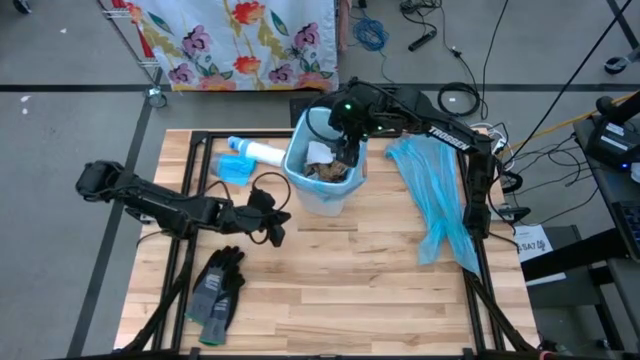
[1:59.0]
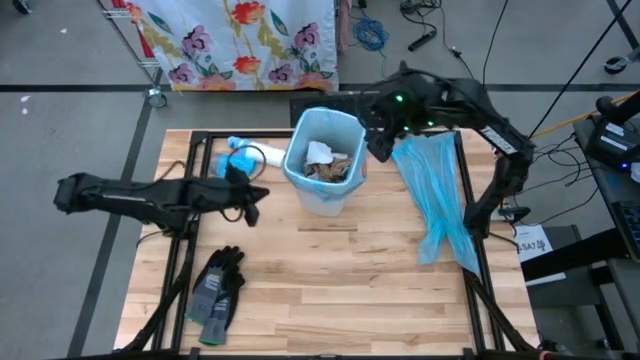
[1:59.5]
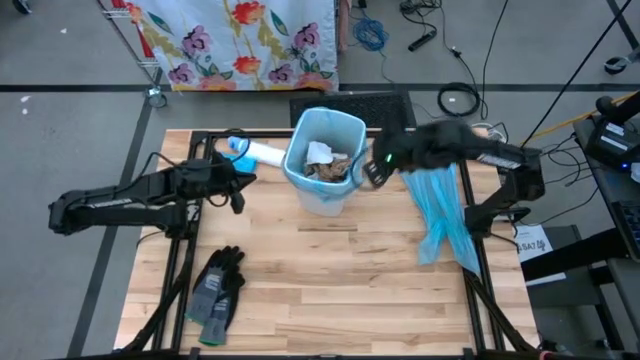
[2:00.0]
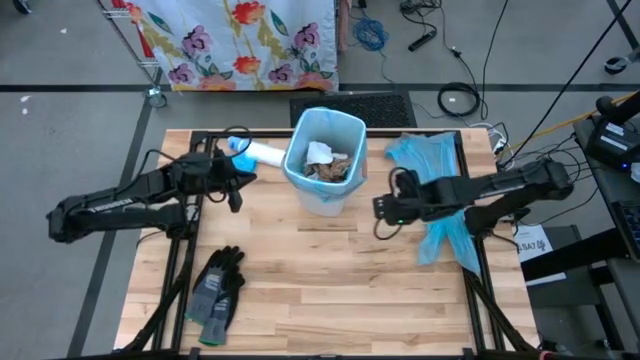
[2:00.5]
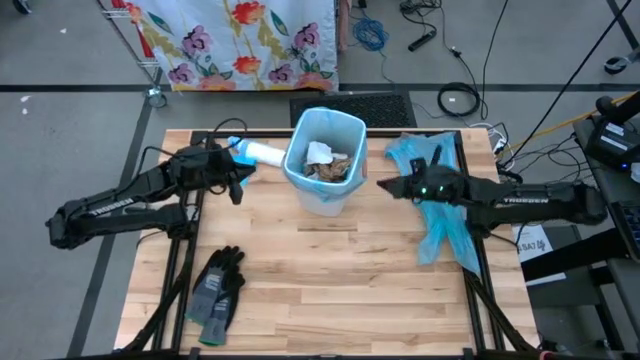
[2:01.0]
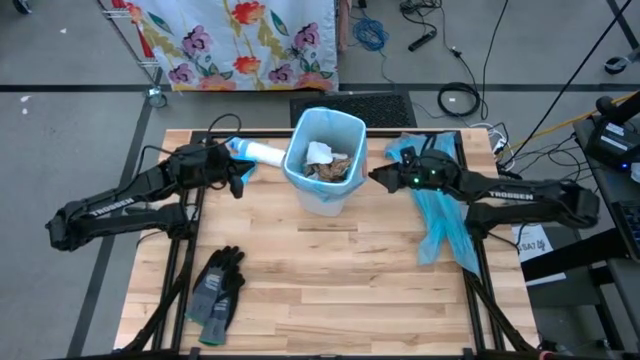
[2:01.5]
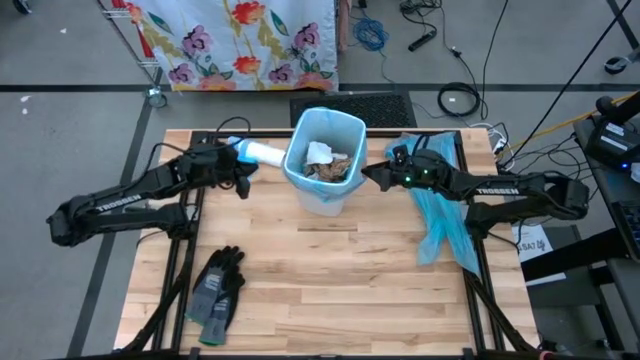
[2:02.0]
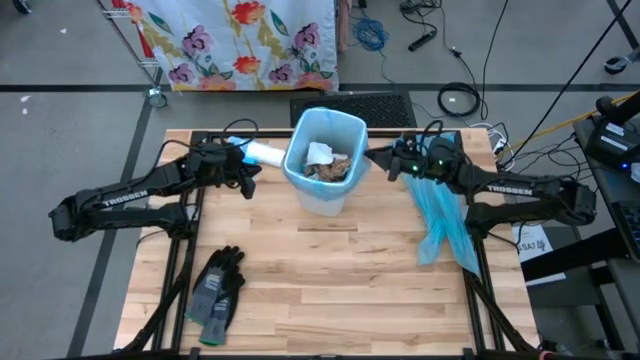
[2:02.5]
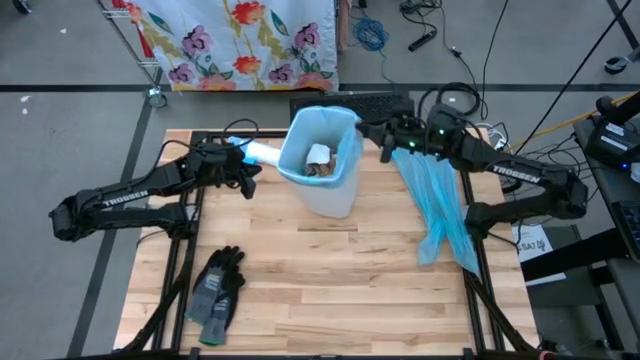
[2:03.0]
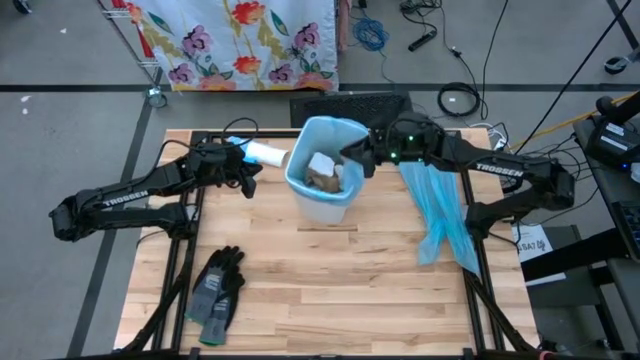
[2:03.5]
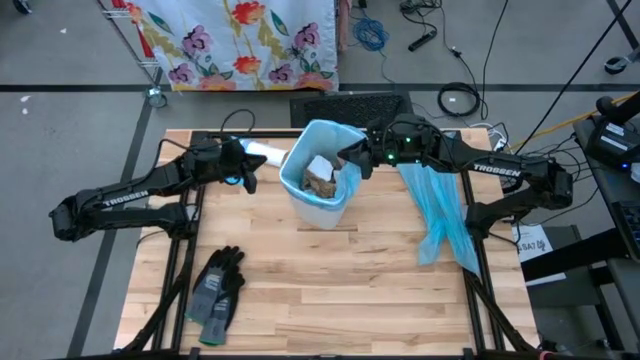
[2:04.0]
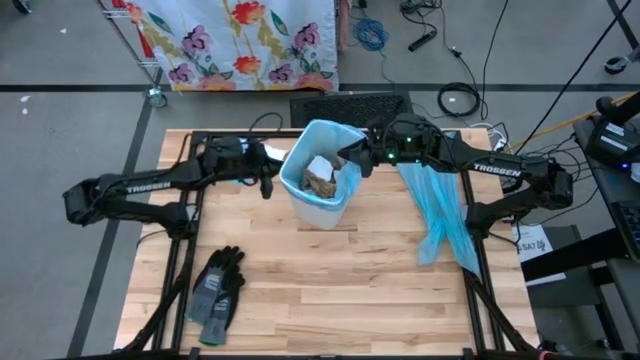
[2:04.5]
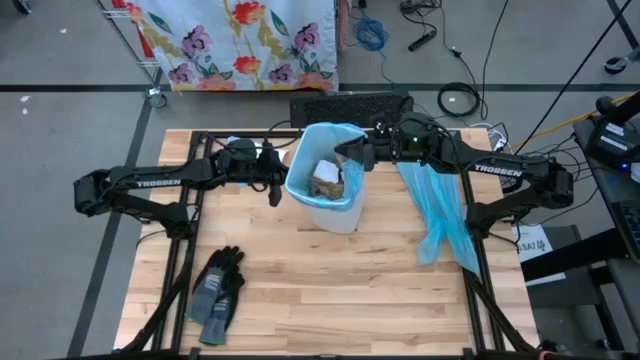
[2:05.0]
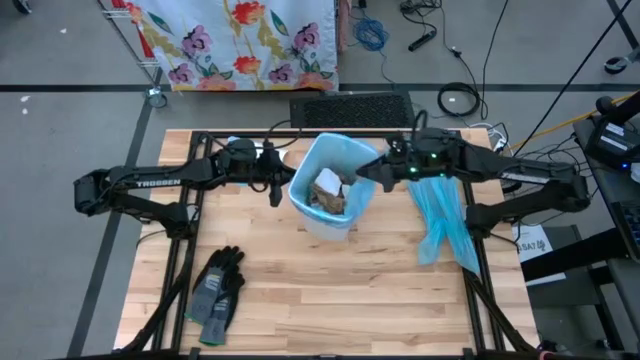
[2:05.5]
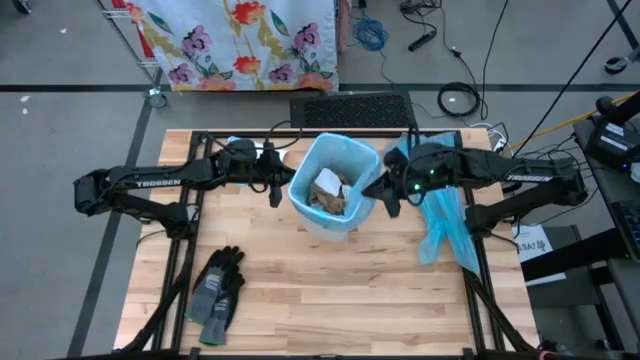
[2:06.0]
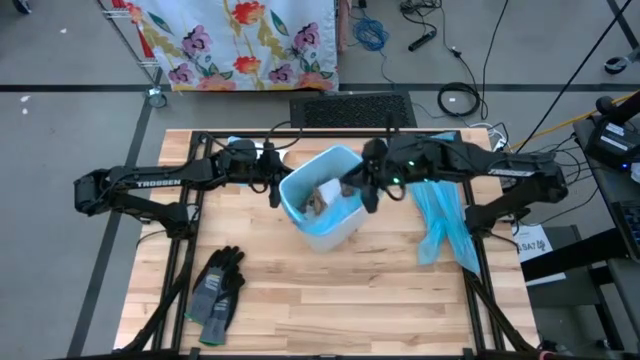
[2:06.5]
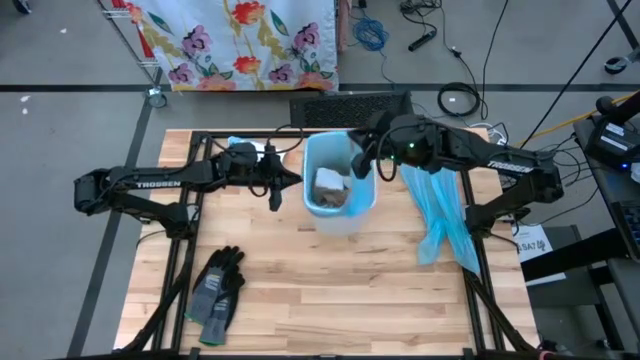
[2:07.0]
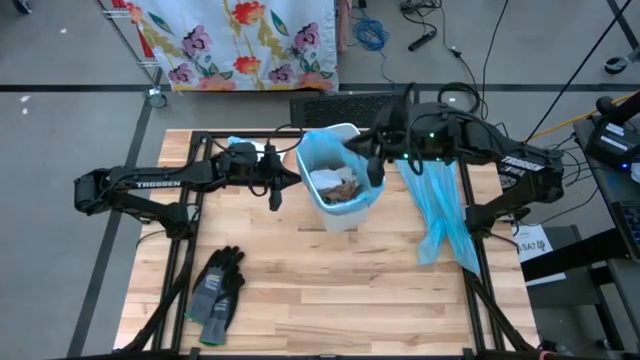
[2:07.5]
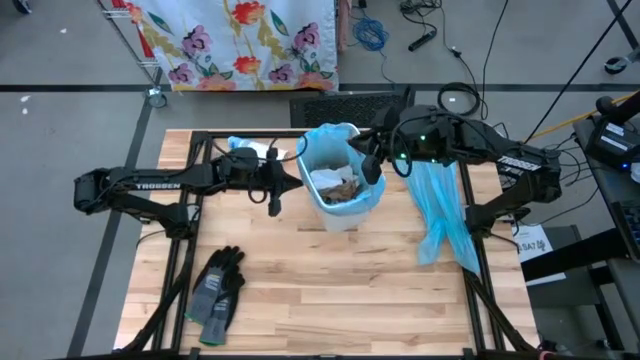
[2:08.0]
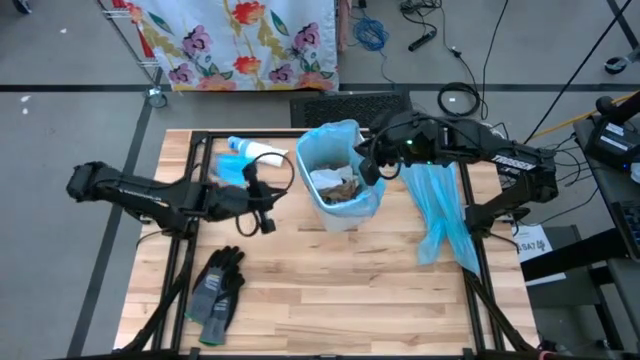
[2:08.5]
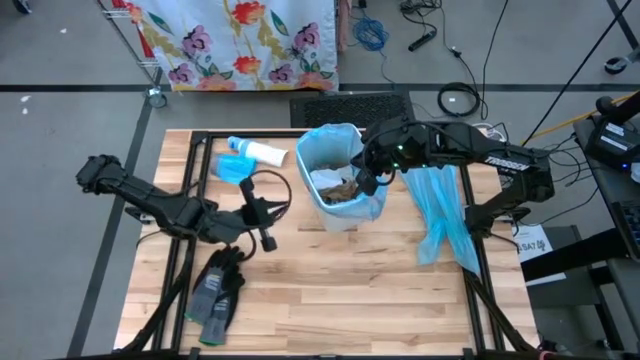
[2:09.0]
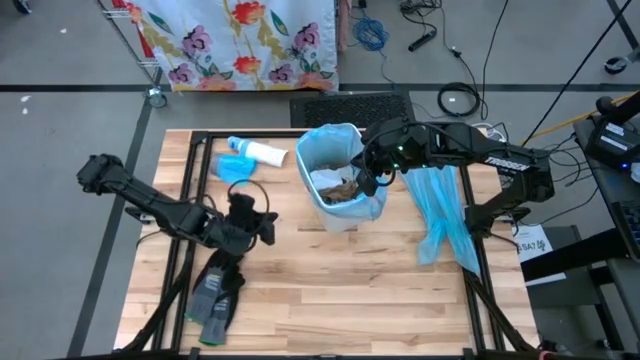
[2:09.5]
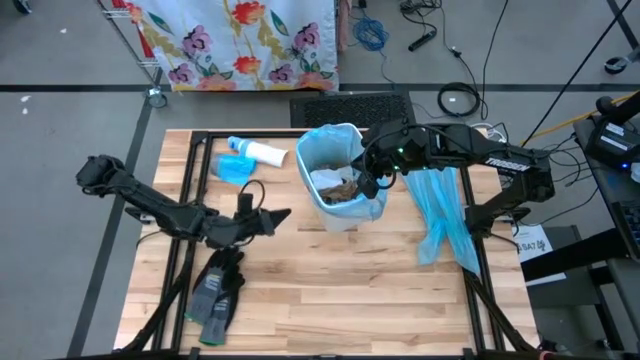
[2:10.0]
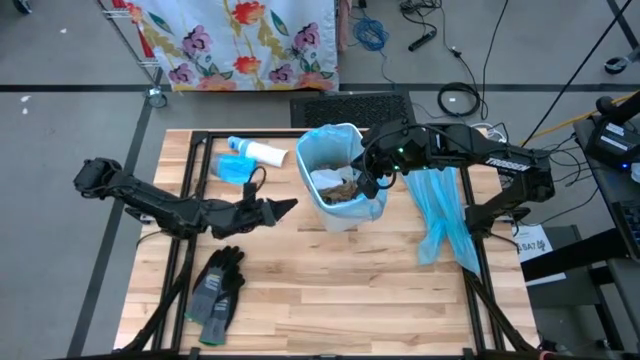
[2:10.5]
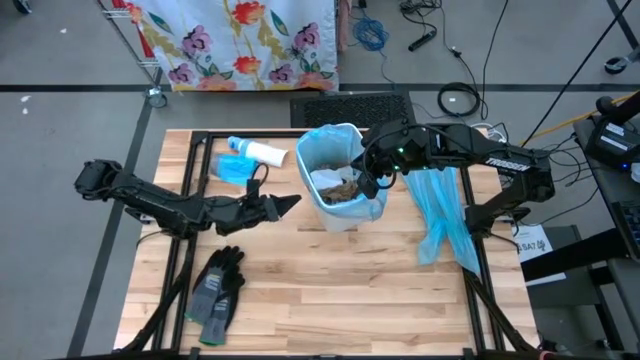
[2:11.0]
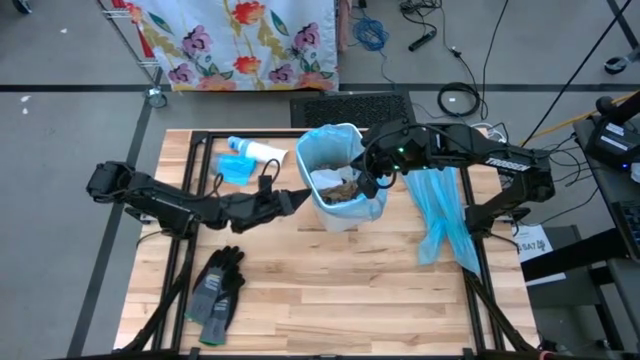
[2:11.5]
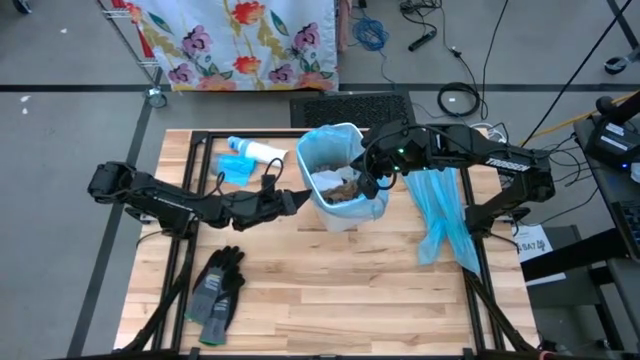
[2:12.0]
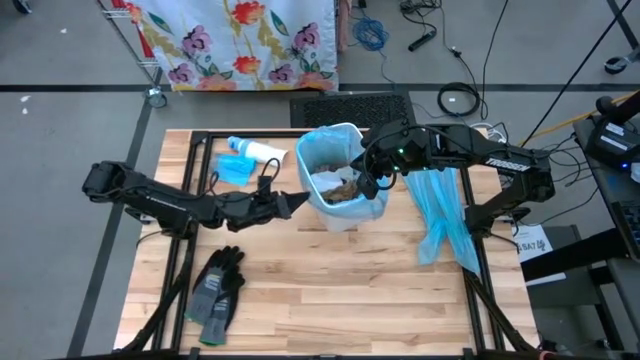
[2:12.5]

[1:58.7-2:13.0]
Task: place trash/remove bag and relplace
Remove trash bag from the trash bin

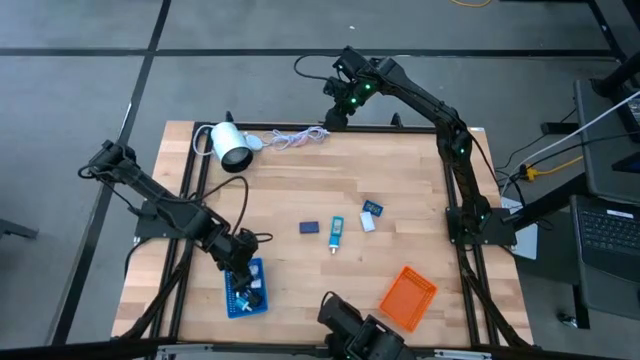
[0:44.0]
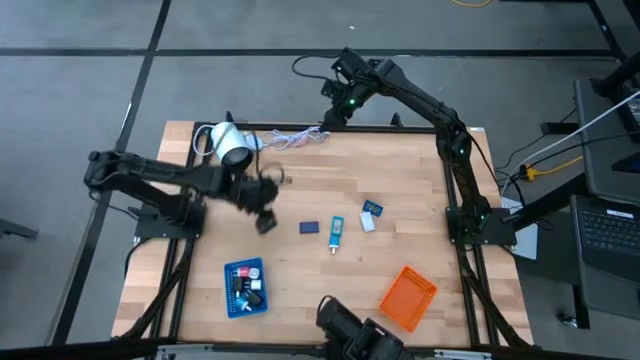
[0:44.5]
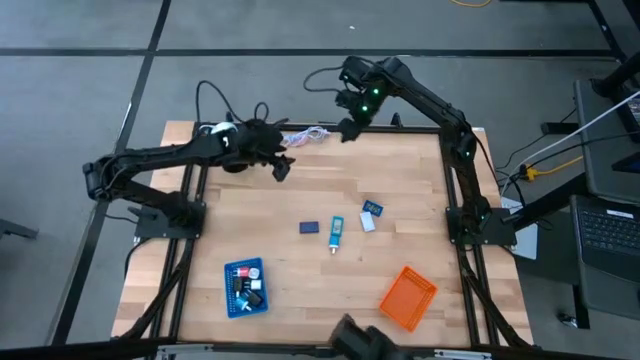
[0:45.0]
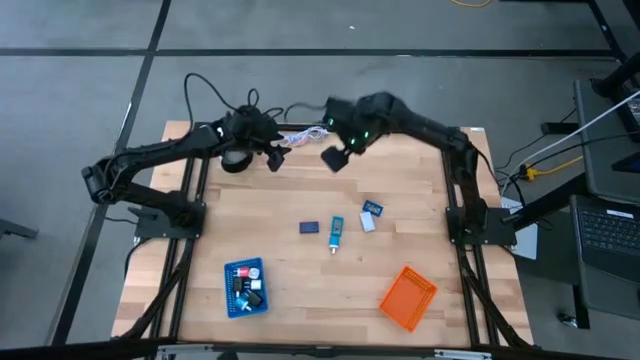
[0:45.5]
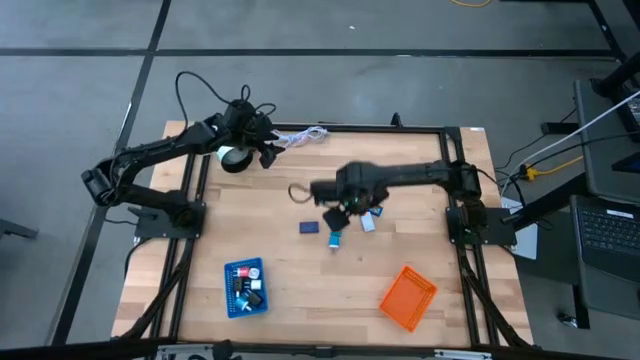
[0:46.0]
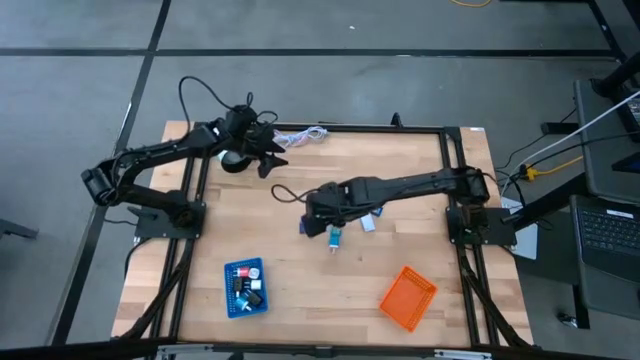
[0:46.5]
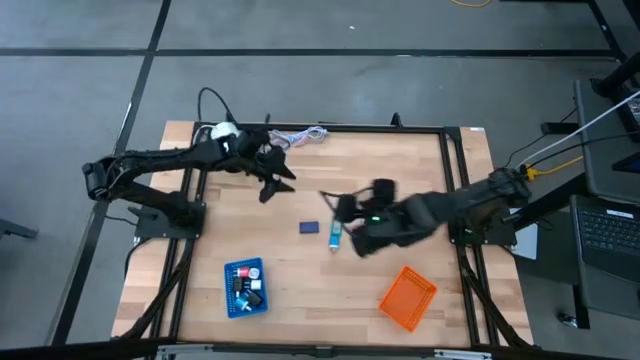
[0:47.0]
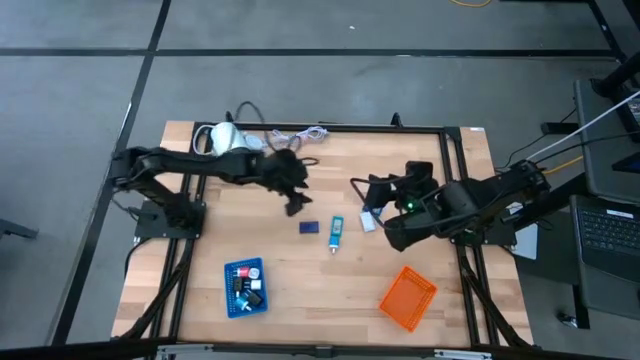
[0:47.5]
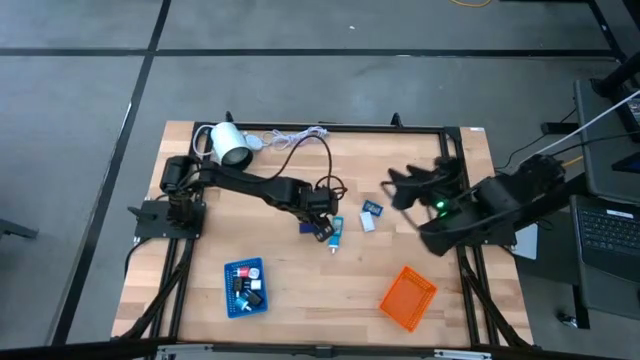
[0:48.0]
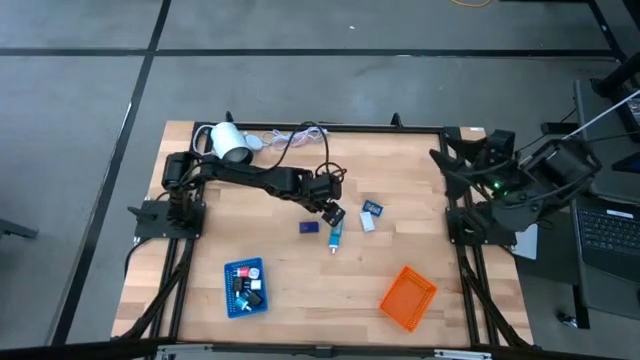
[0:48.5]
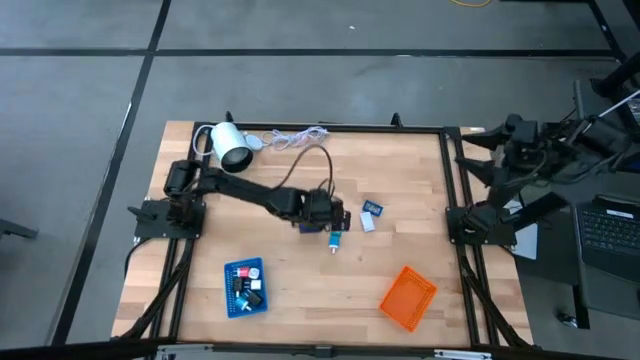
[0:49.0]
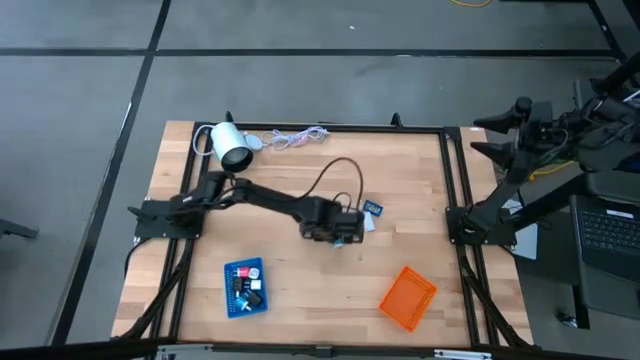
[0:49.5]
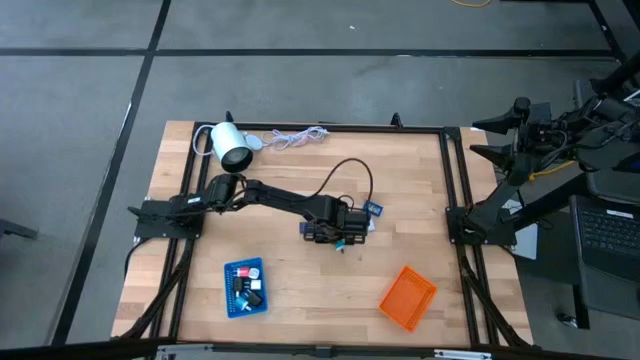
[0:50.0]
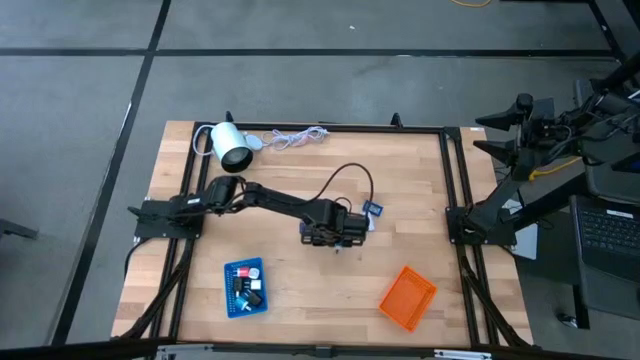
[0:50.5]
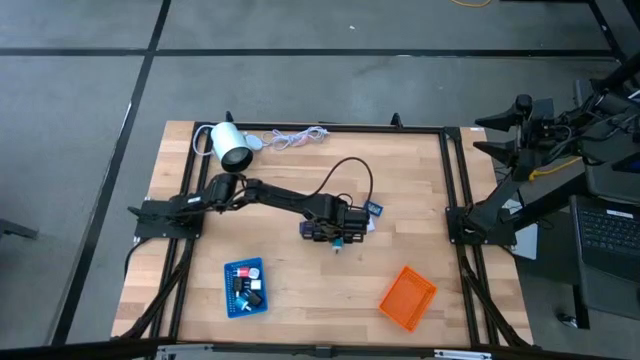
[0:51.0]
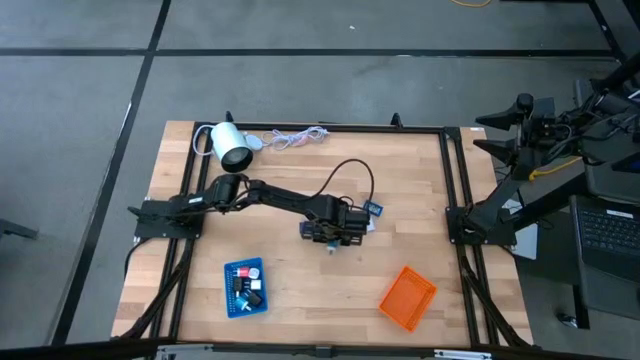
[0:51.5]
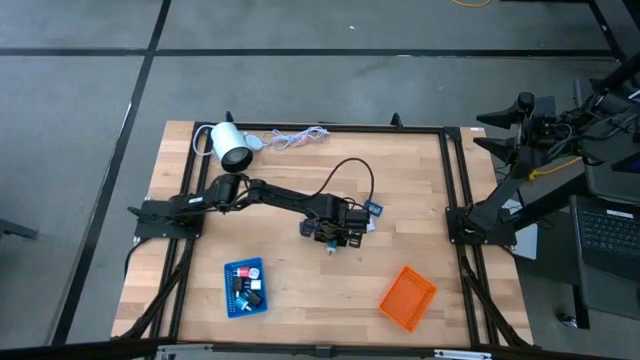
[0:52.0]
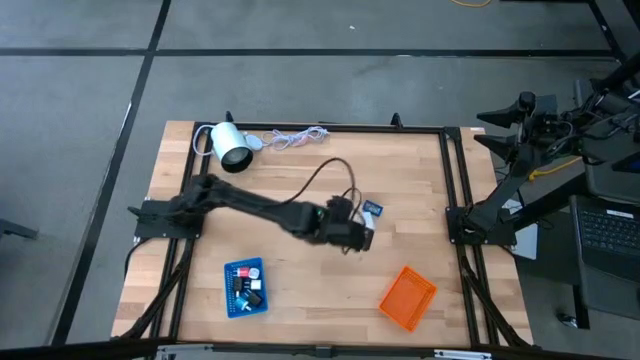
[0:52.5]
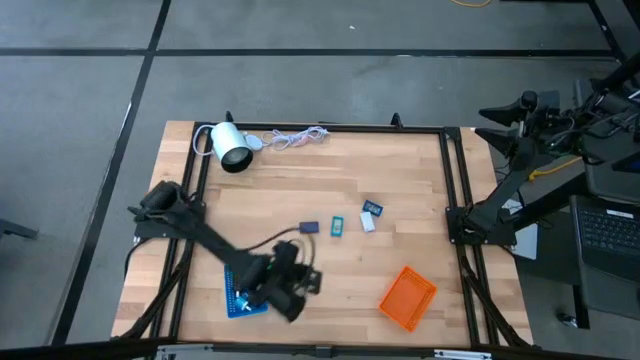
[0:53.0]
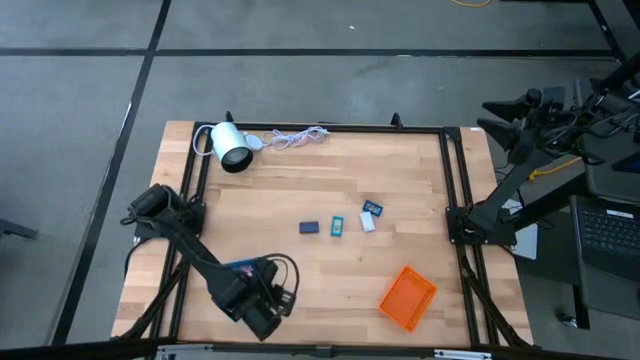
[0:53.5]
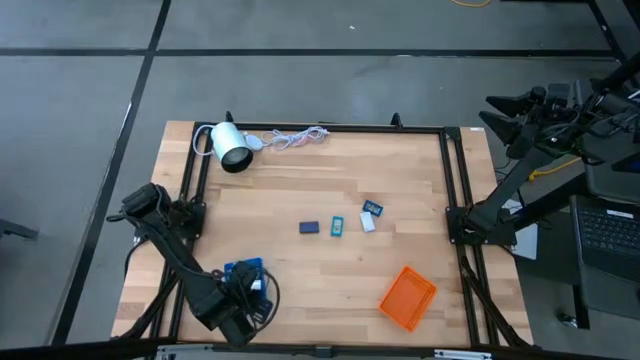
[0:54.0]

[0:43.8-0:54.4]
Task: Pick & Place Office items
Put the blue charger adapter into the blue basket
